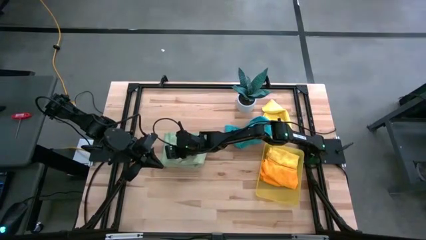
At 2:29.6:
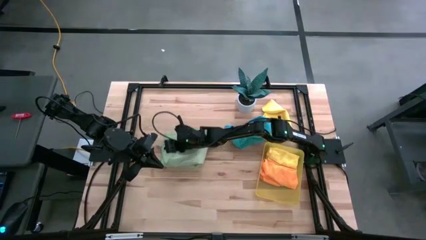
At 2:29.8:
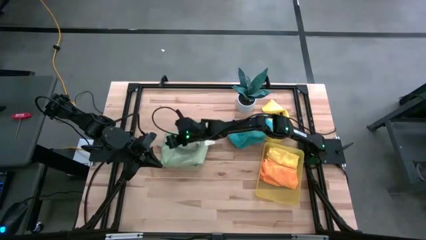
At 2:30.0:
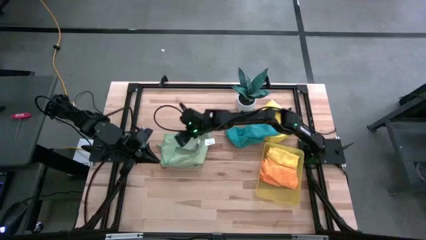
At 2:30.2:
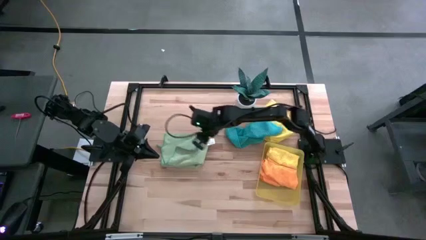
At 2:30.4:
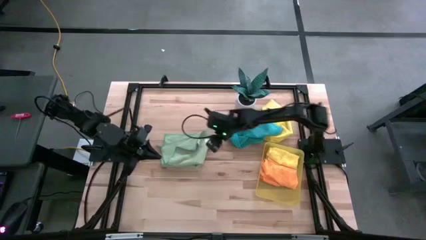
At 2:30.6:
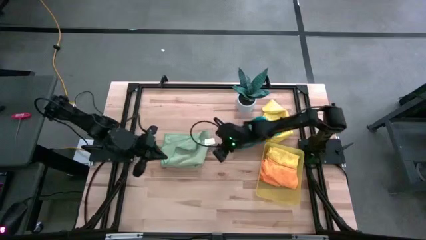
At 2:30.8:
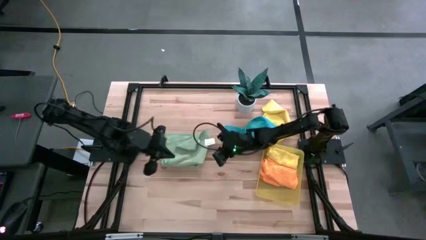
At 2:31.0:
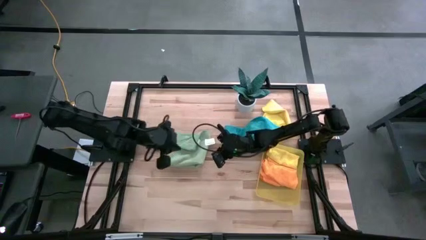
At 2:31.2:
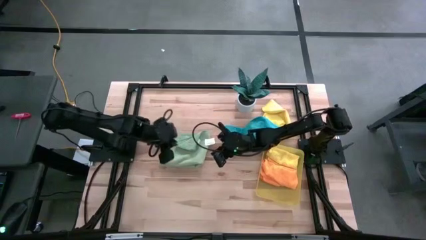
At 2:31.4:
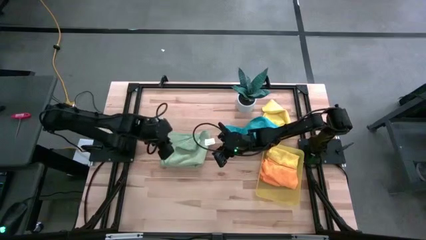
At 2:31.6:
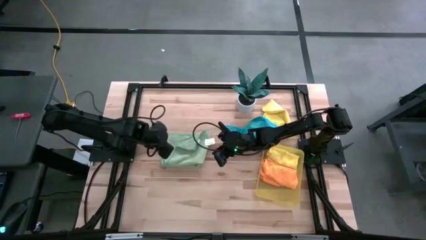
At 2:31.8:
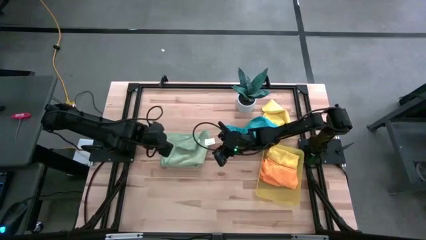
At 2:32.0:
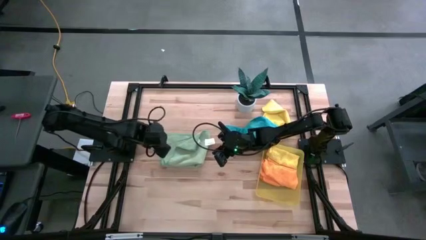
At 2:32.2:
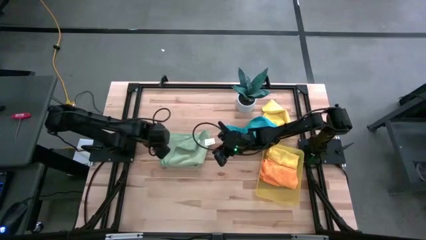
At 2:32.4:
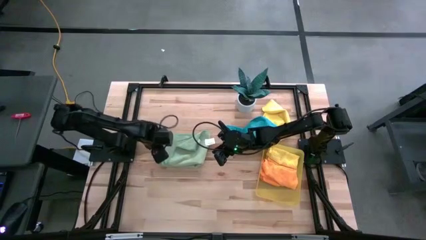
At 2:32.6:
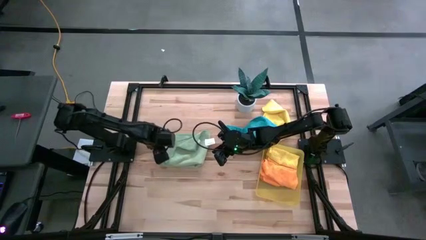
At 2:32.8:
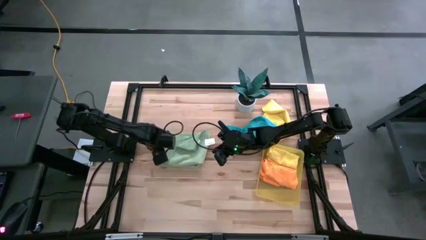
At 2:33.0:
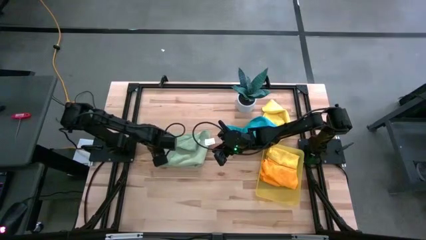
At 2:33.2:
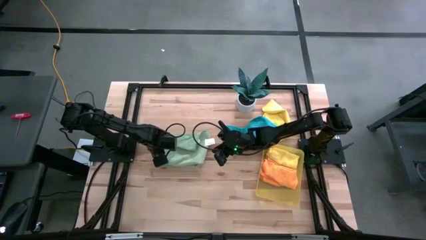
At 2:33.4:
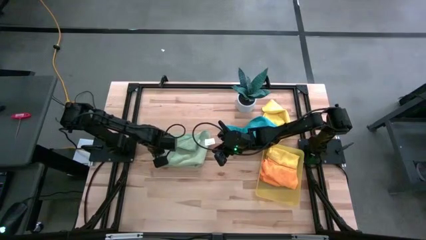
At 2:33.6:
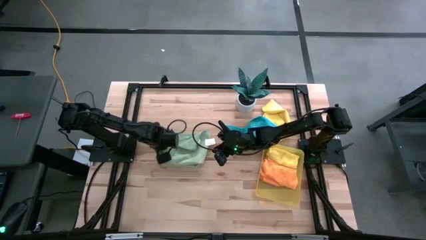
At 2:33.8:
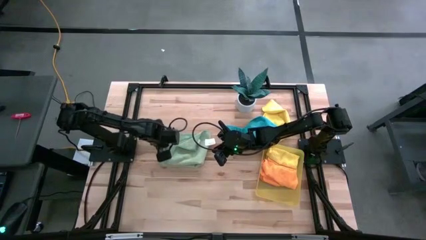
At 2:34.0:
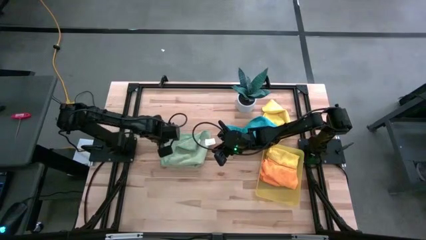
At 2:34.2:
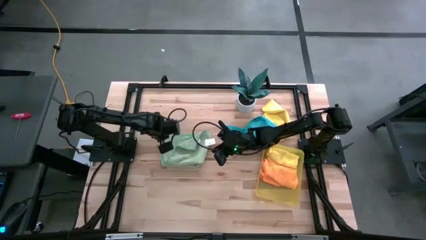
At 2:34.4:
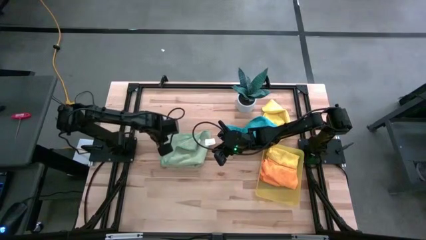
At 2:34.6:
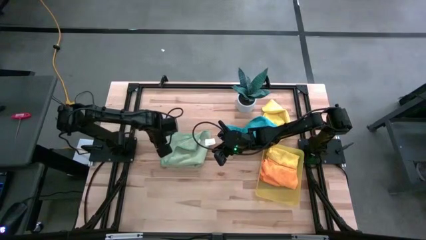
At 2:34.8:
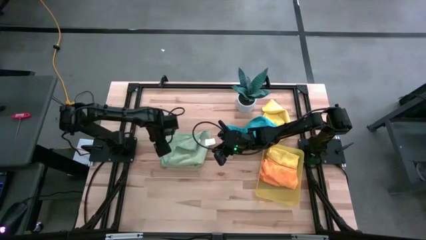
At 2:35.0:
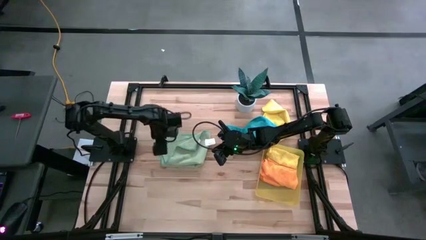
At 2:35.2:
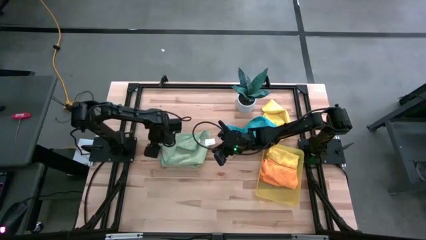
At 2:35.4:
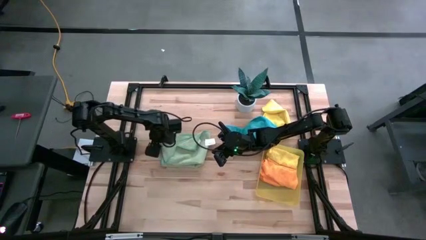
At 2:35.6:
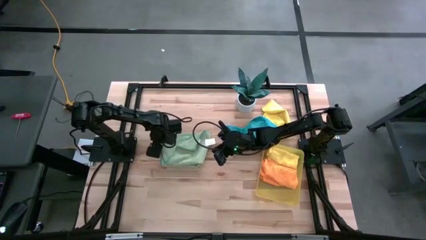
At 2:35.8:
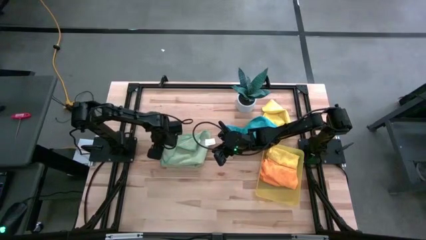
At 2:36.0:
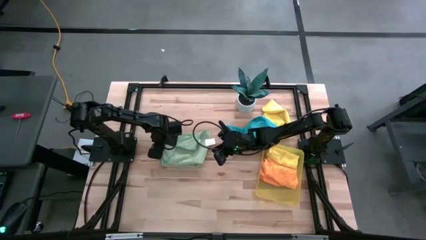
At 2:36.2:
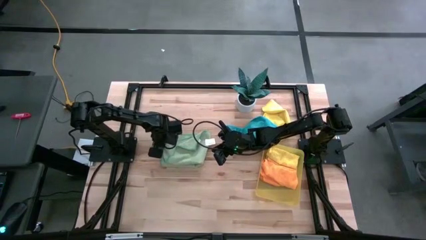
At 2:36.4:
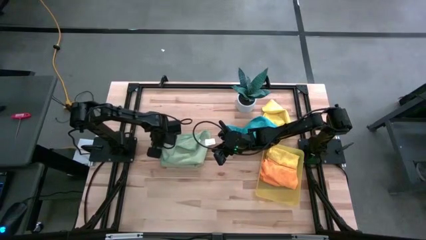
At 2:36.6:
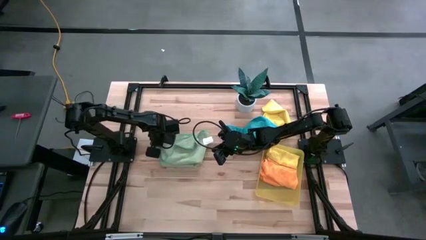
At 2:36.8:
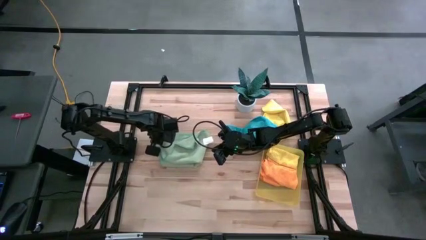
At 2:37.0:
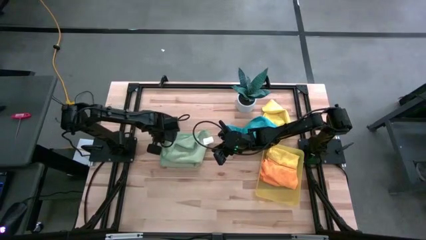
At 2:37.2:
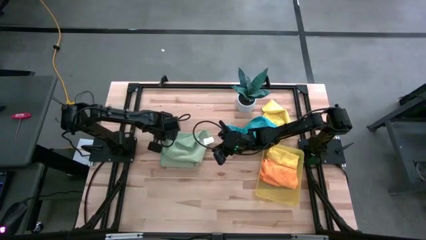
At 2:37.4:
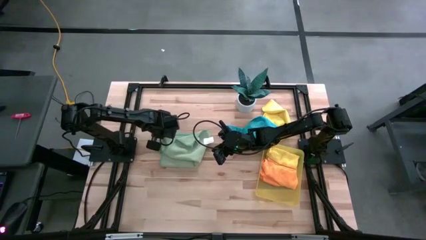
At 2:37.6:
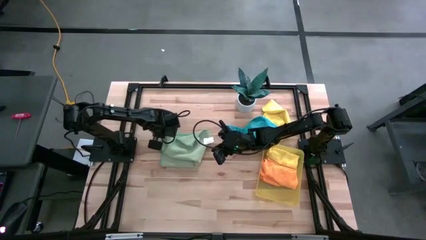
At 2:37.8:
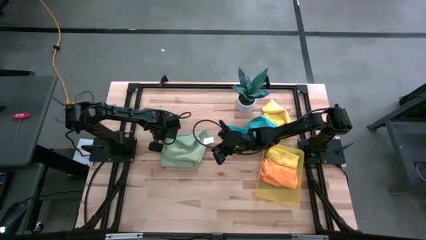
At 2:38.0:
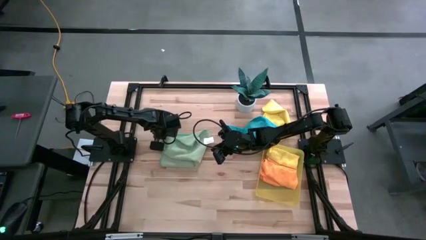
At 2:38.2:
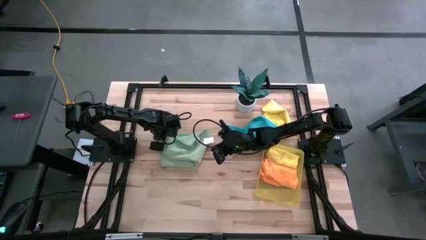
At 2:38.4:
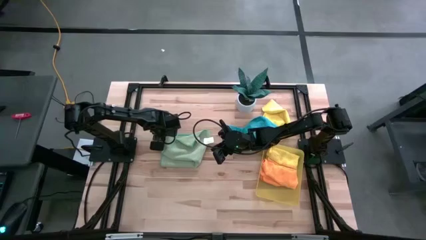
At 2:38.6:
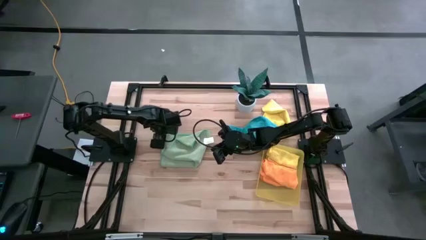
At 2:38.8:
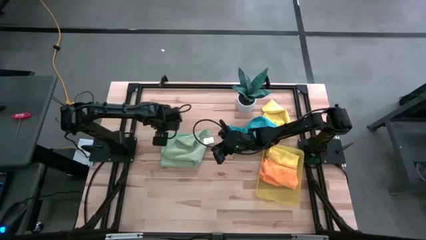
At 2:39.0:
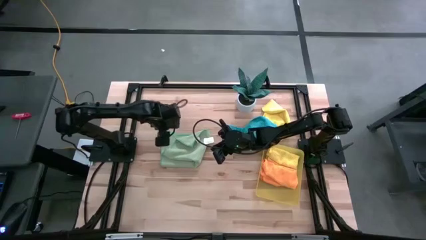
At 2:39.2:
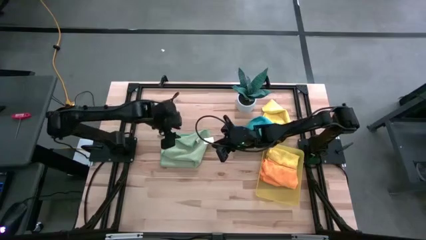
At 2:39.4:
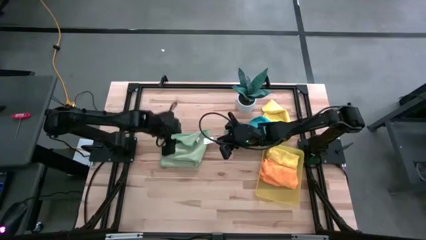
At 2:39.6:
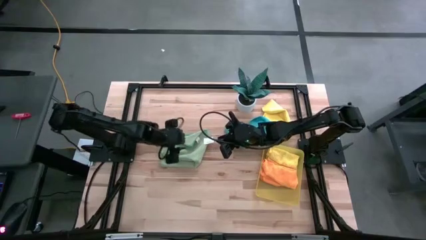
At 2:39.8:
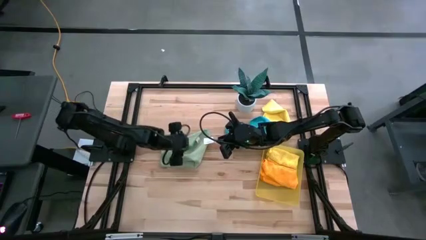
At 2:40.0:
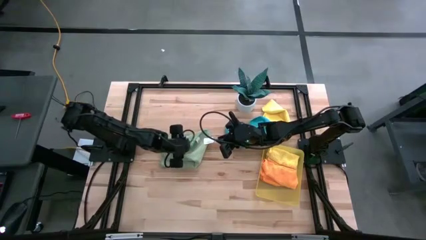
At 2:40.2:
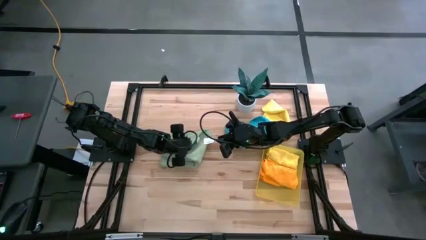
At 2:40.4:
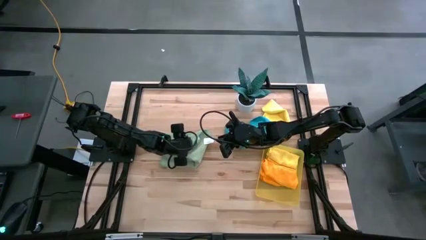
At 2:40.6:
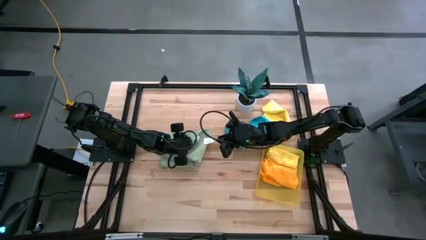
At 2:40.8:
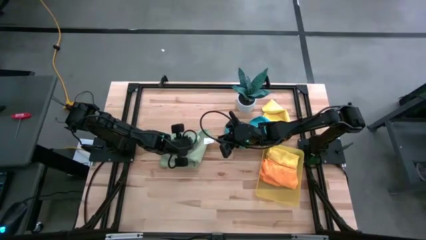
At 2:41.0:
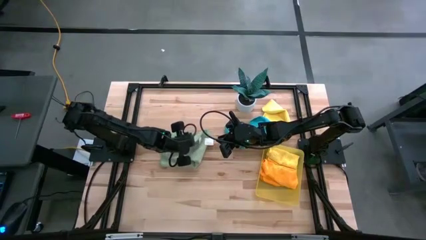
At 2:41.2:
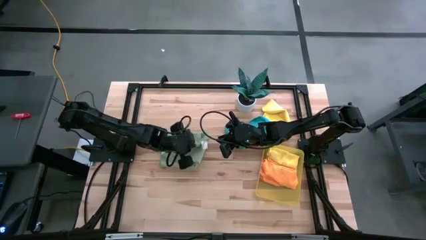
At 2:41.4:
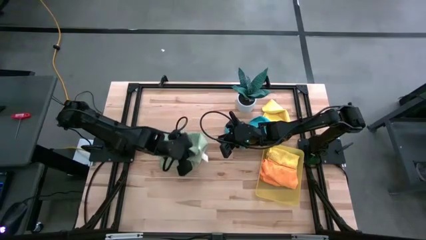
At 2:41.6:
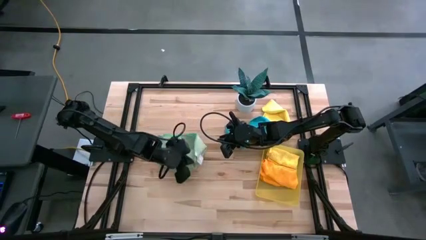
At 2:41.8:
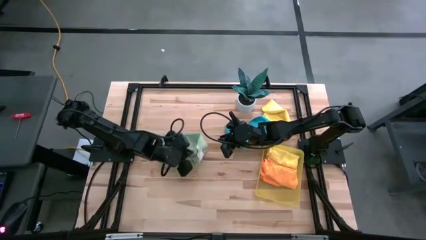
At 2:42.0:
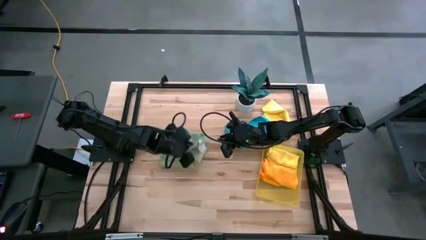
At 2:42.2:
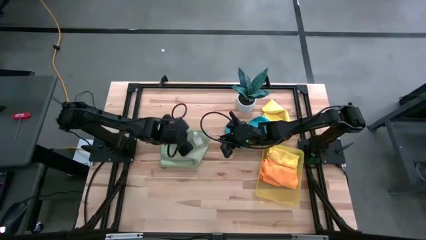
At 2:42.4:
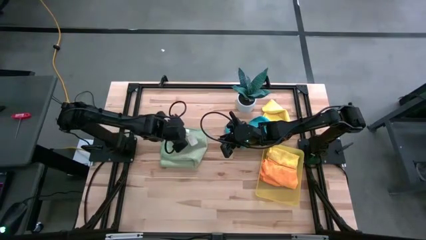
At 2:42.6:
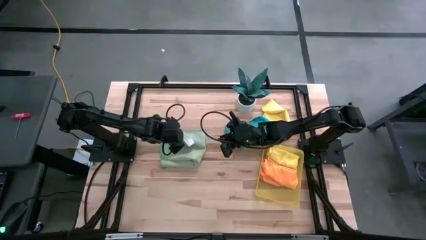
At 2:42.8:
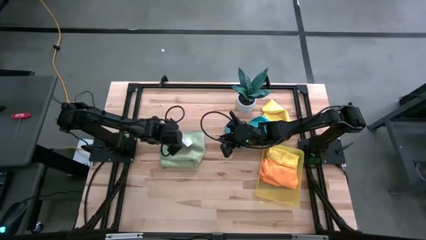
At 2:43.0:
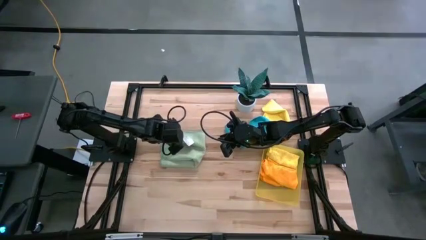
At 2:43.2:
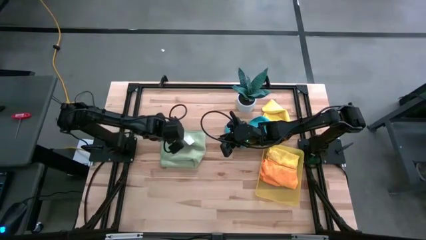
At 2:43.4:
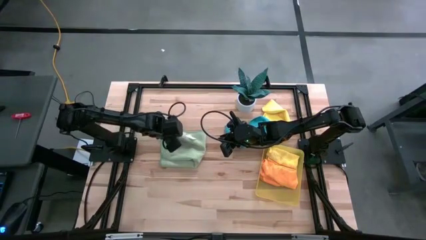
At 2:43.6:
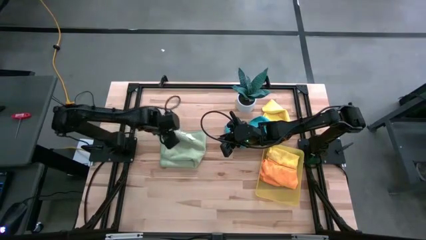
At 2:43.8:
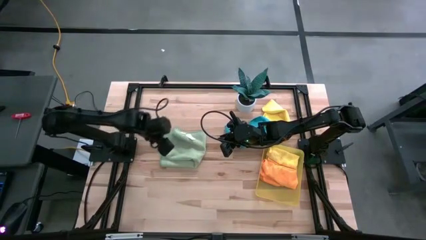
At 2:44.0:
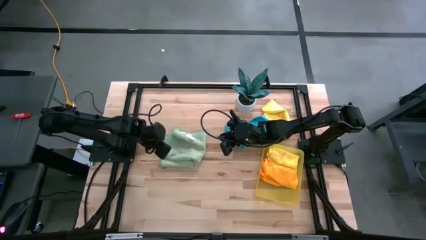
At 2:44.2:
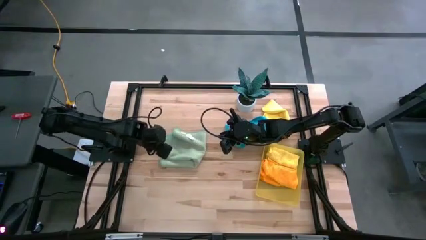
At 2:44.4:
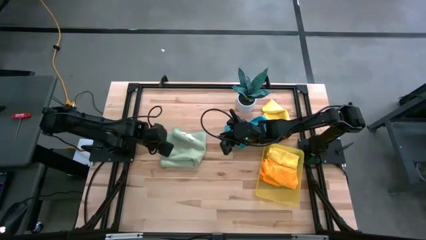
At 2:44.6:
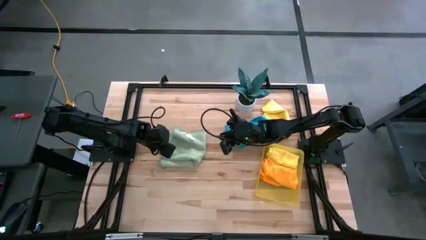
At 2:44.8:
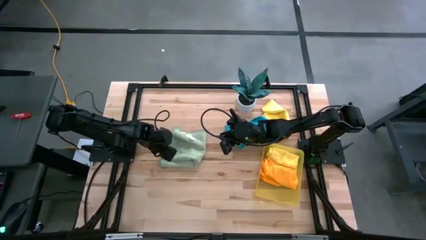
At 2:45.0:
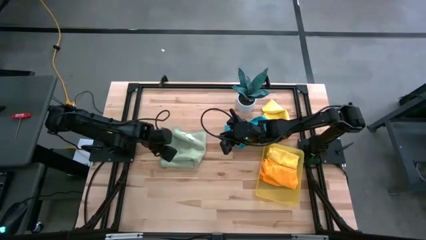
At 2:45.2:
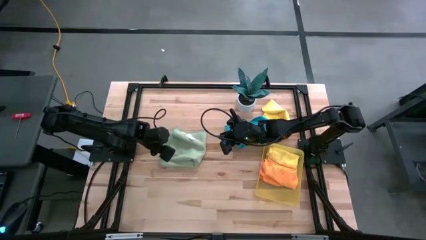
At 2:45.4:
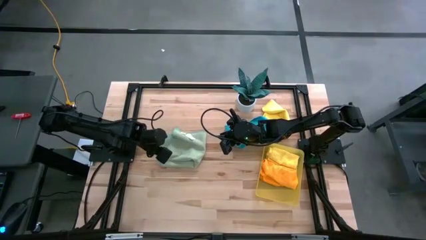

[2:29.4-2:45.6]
Task: Fold microfiber towels
Fold the light green microfiber cloth
